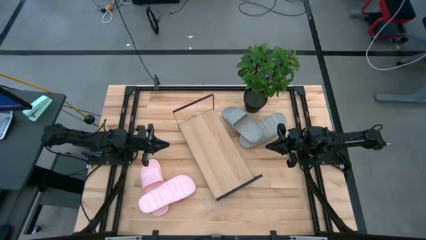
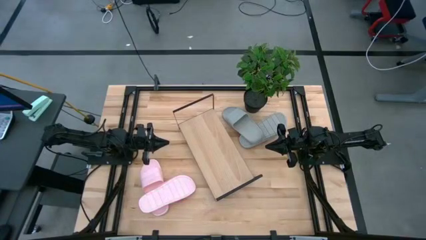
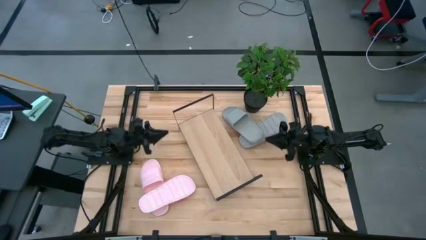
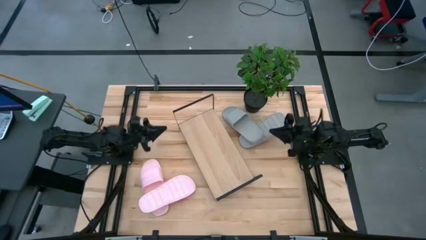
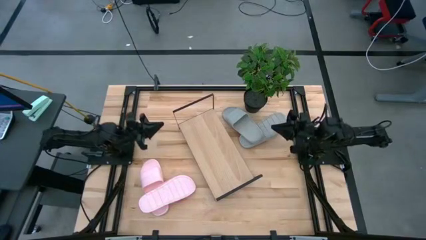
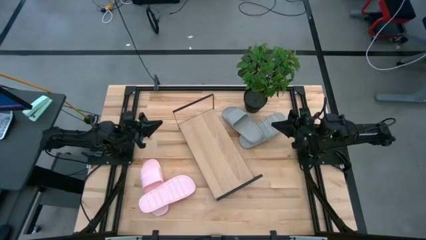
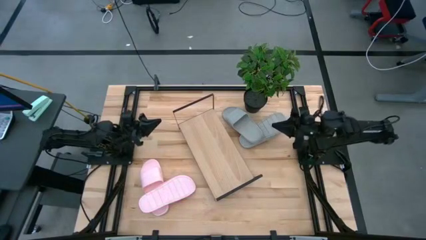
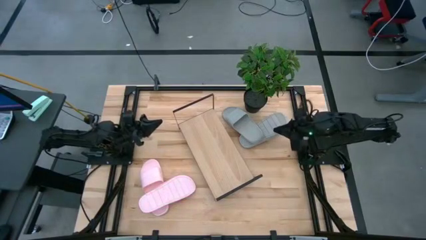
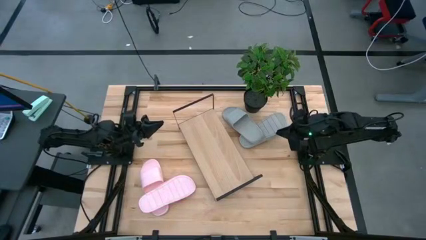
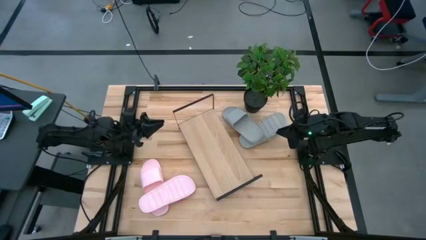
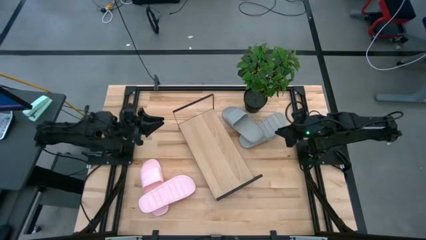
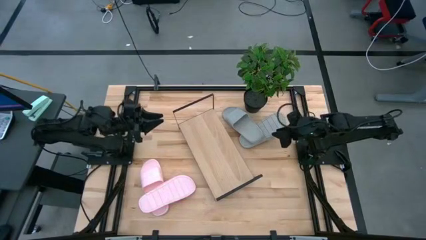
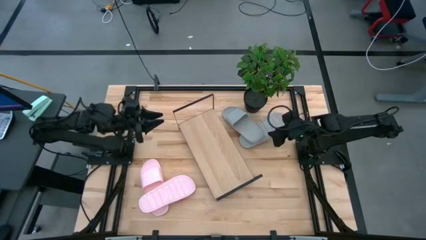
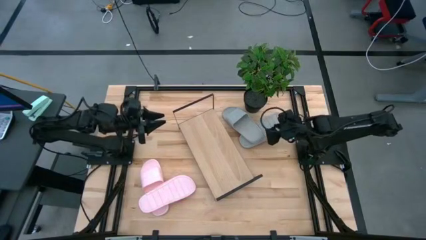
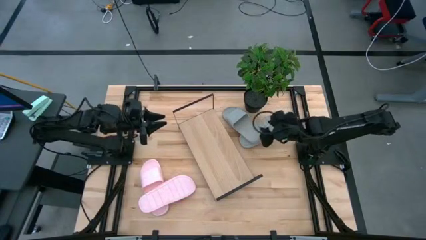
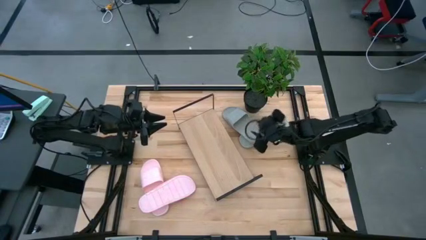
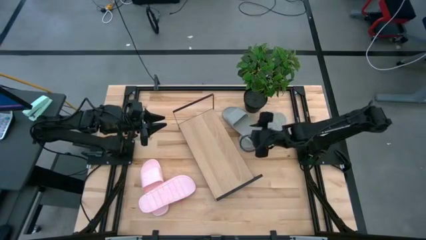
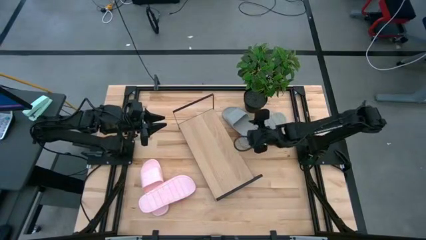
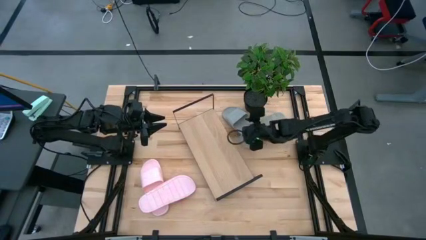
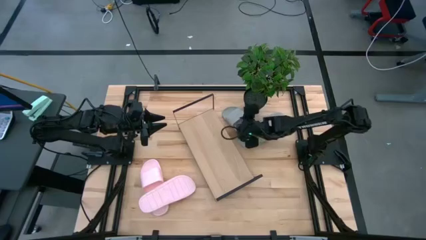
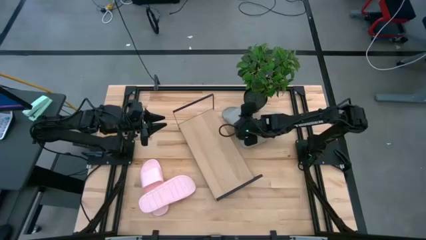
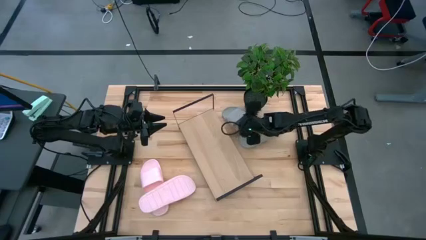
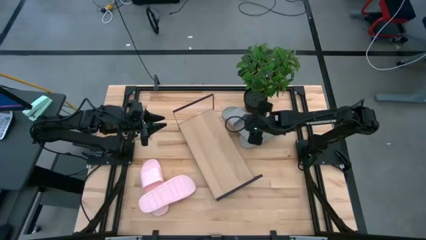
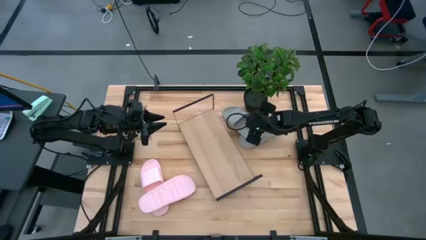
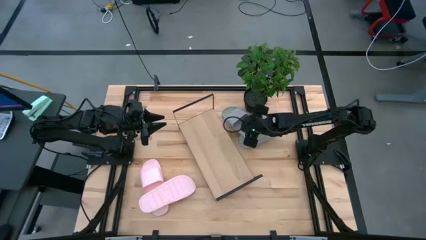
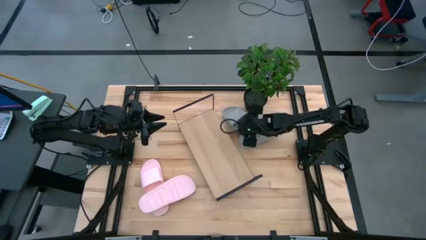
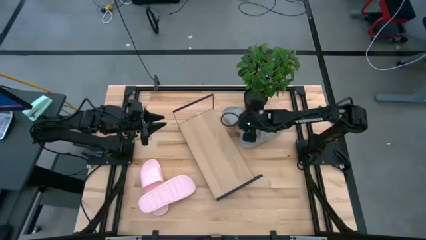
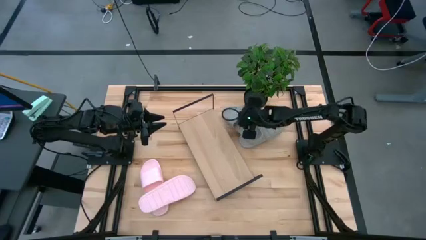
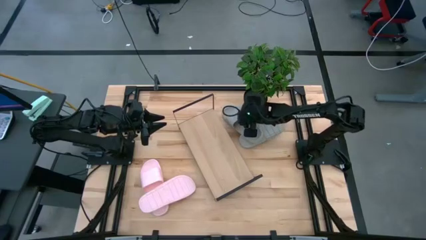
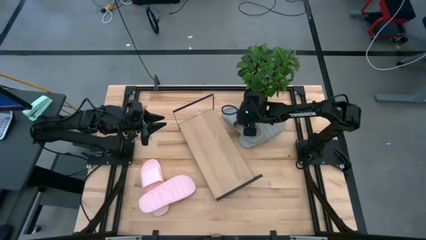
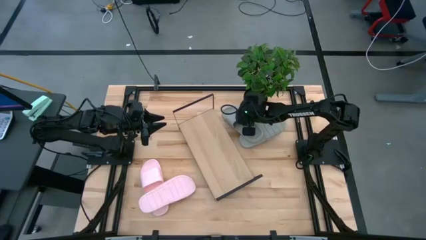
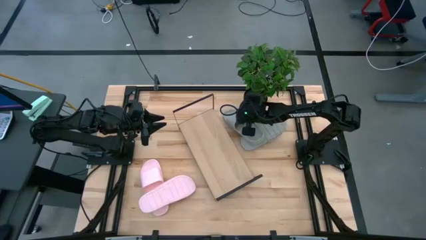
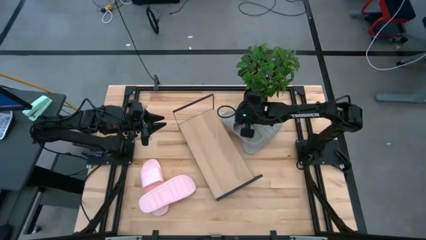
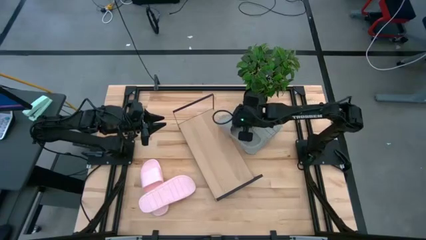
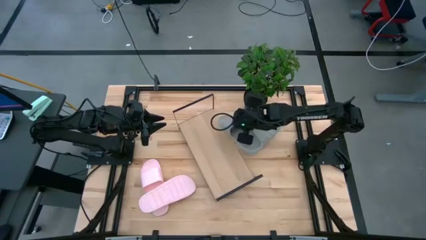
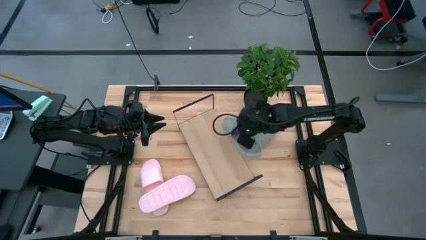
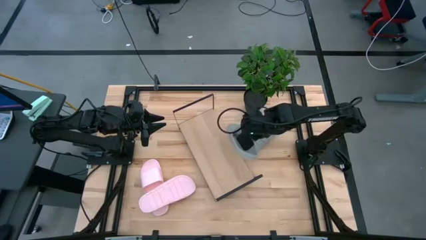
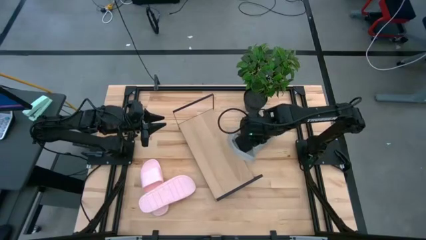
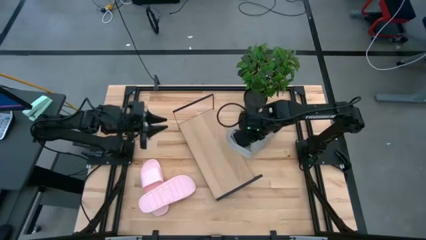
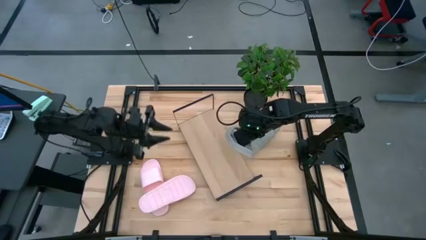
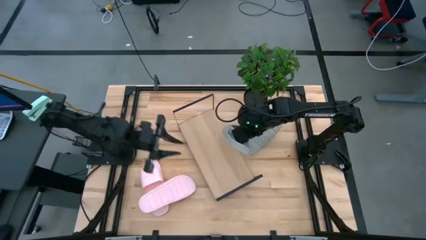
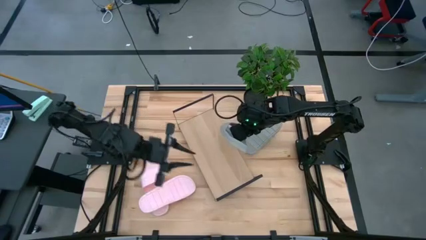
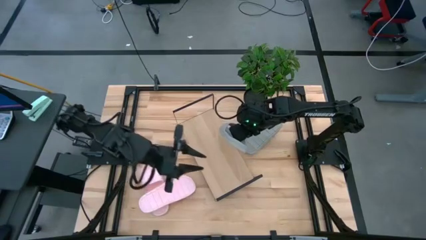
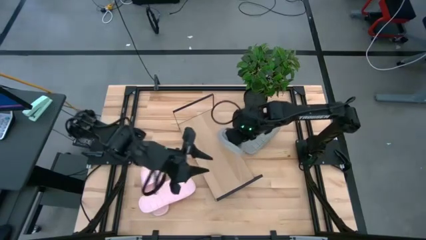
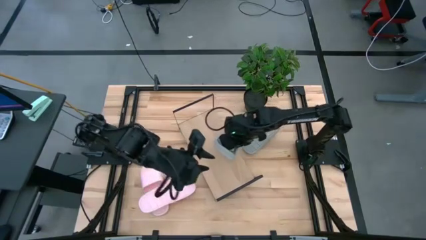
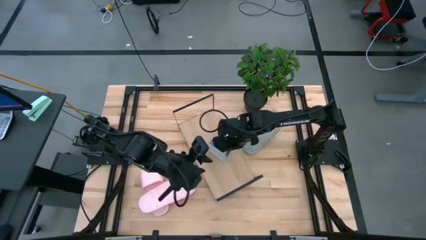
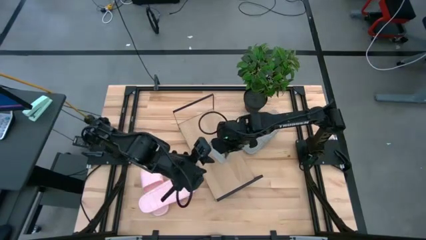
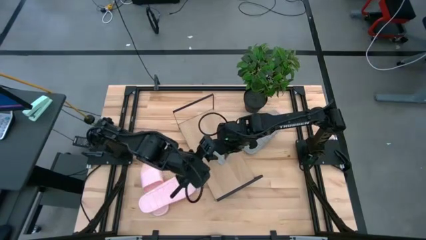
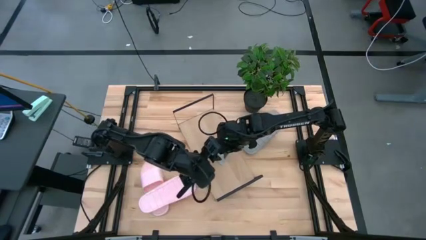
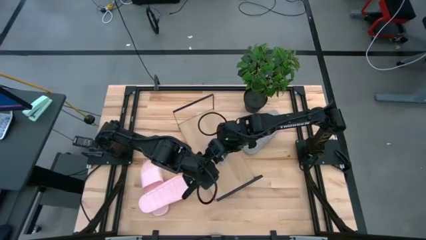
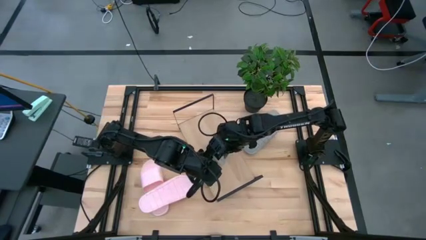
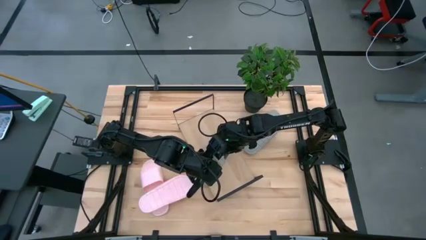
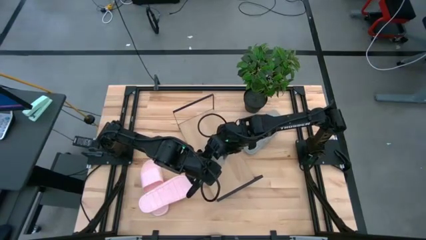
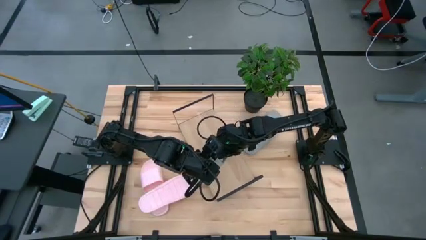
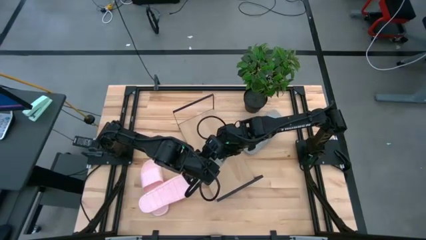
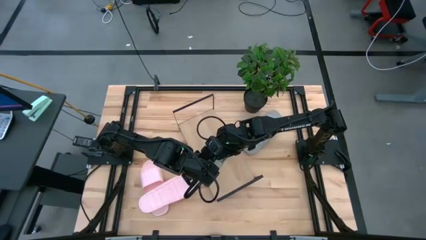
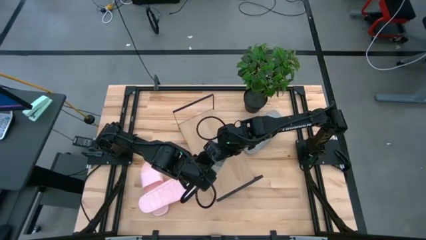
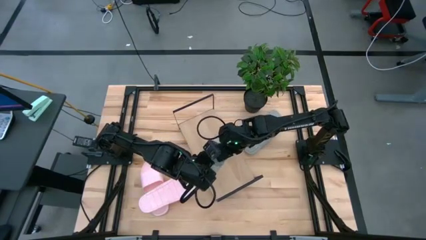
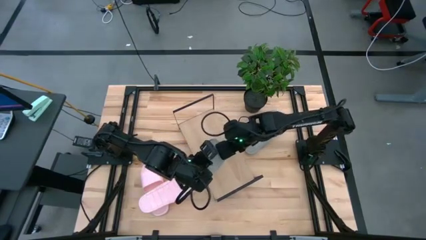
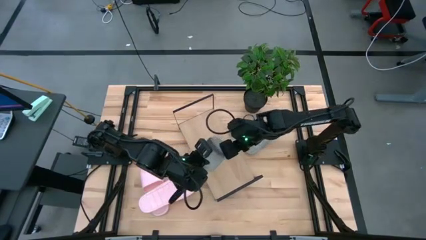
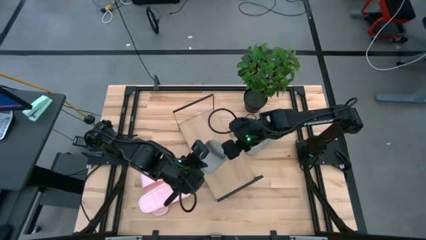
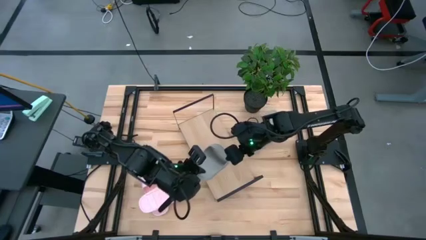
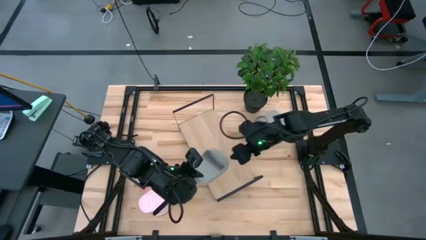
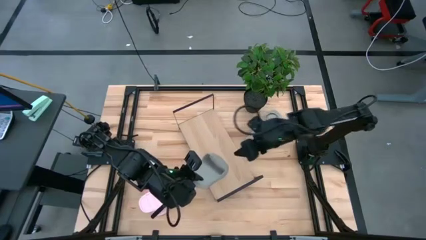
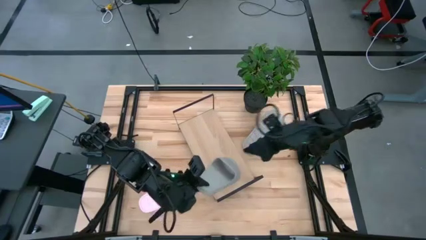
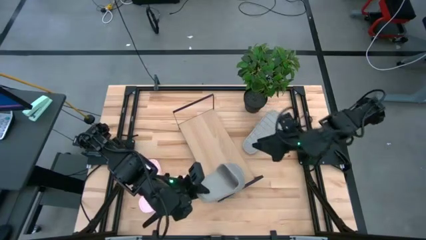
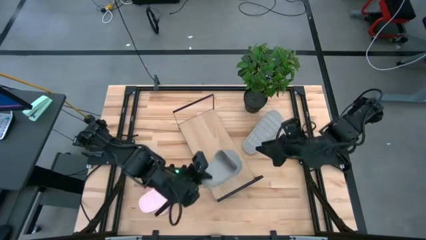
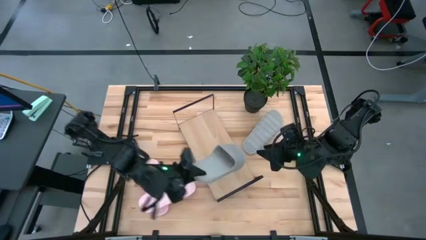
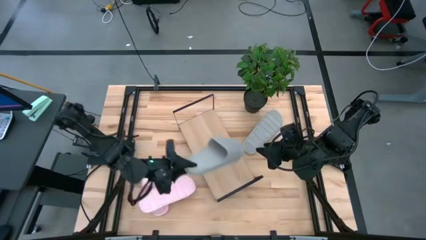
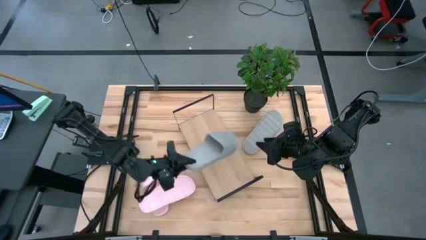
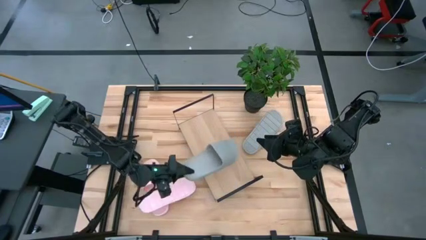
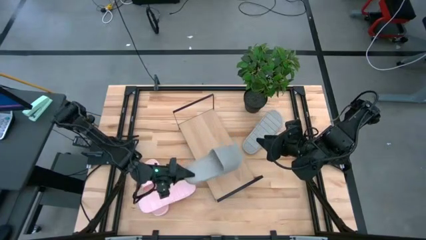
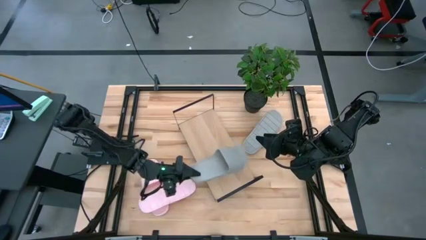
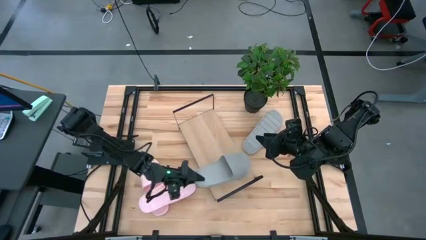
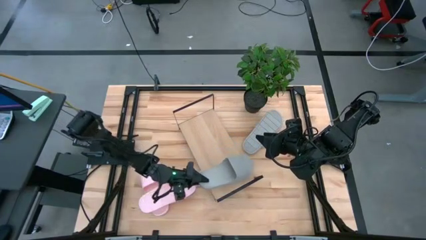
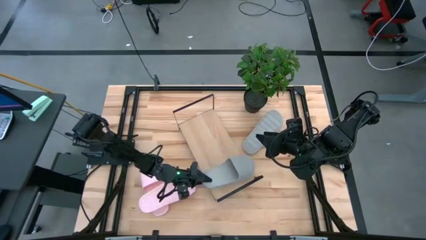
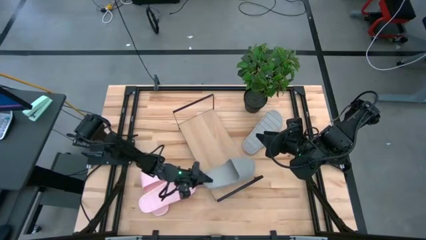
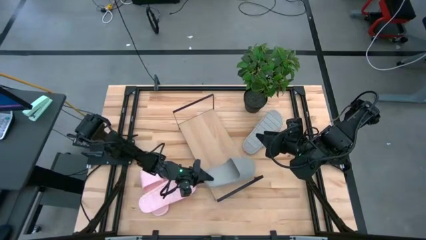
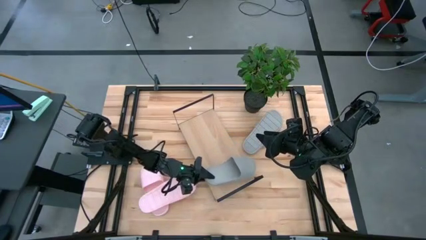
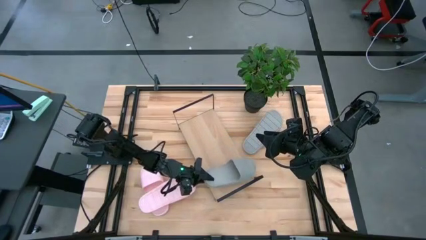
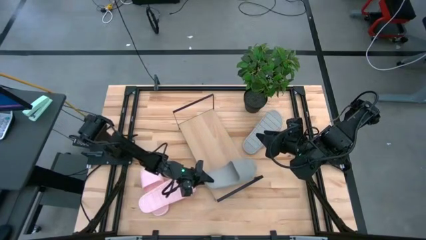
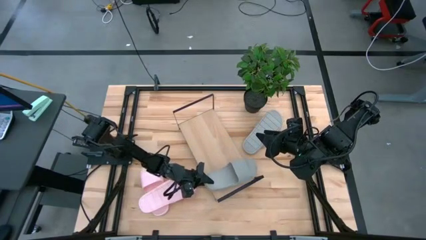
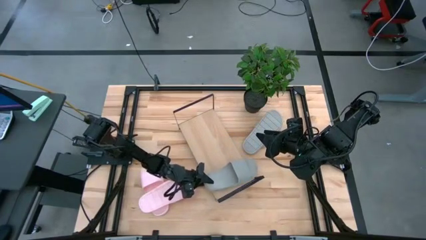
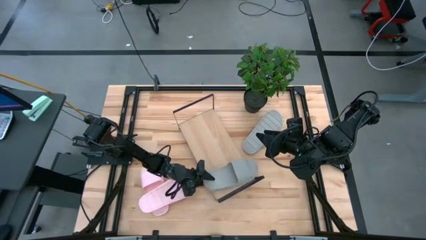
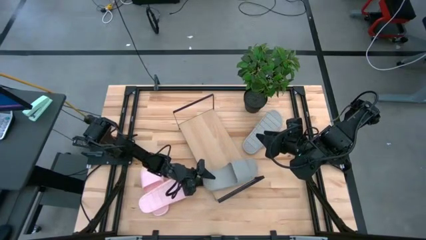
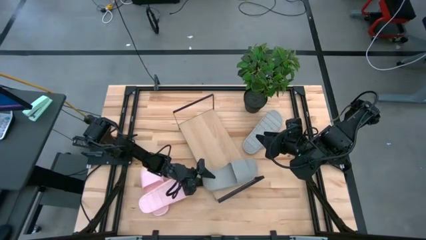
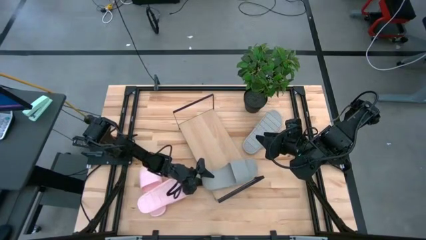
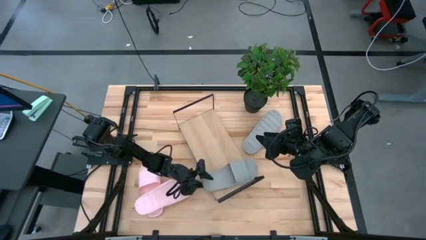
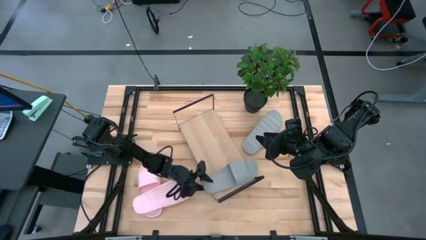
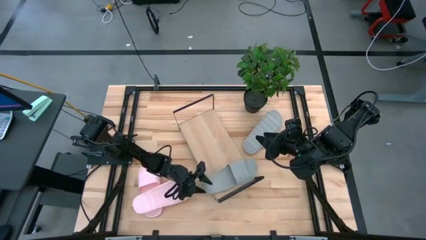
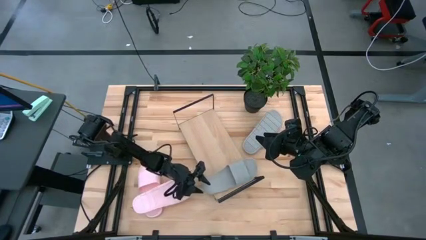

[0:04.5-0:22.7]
Task: Pick and place slides into the shelf
Put the left gray slide on the shelf
